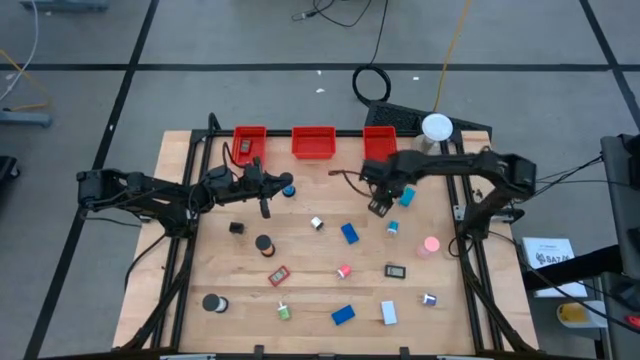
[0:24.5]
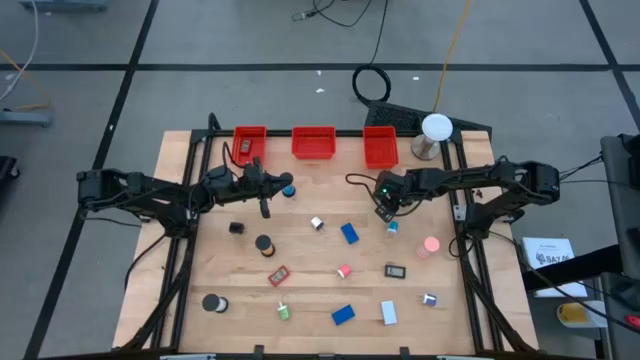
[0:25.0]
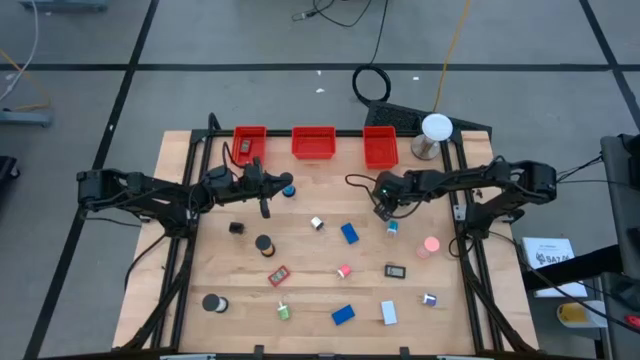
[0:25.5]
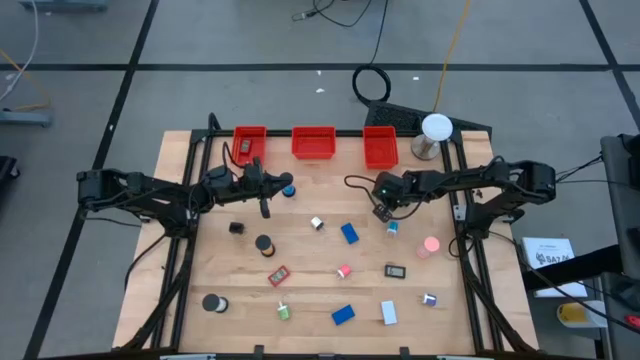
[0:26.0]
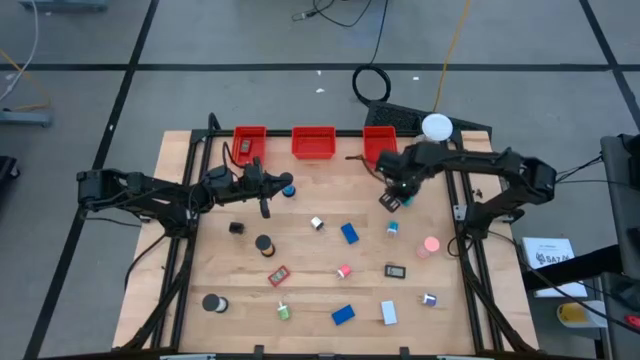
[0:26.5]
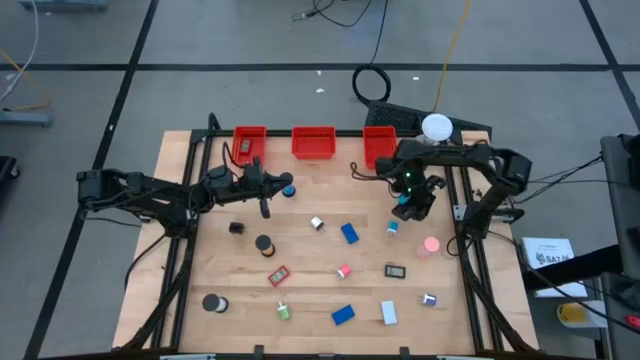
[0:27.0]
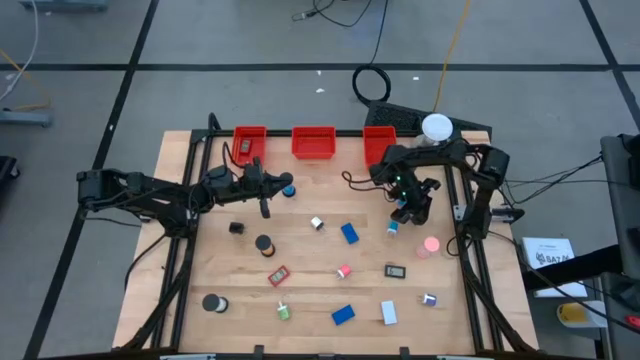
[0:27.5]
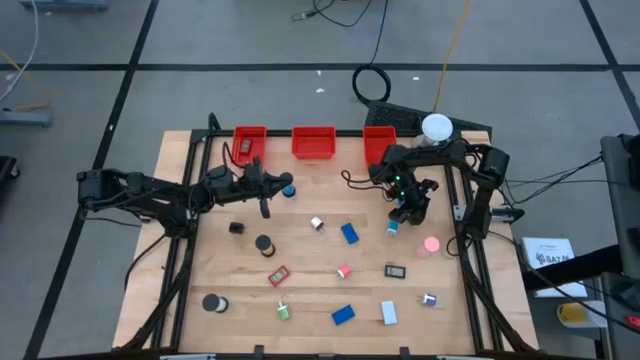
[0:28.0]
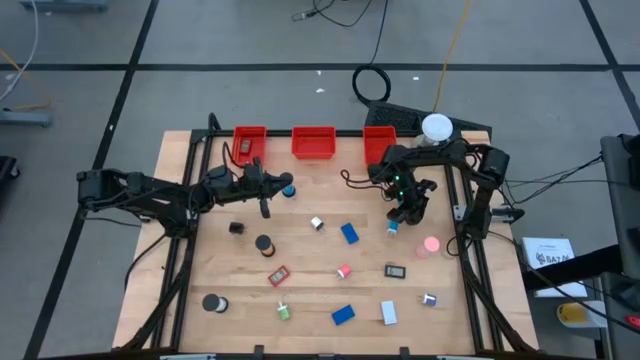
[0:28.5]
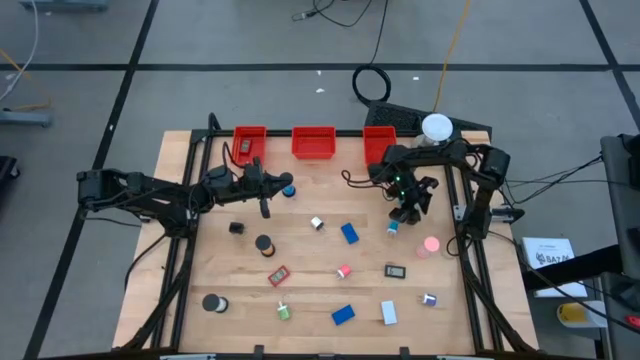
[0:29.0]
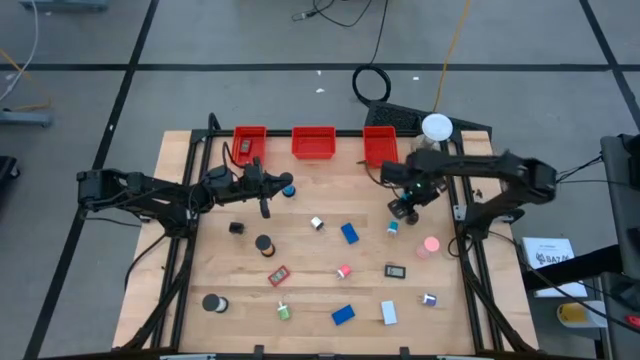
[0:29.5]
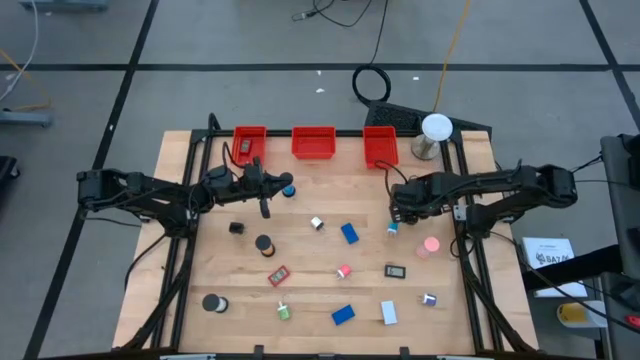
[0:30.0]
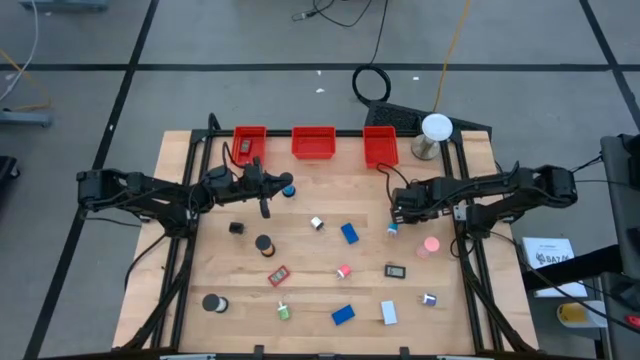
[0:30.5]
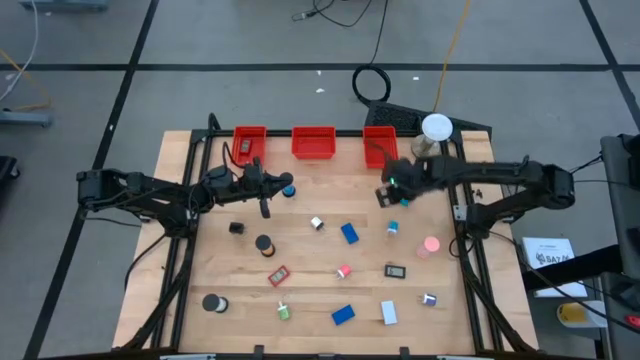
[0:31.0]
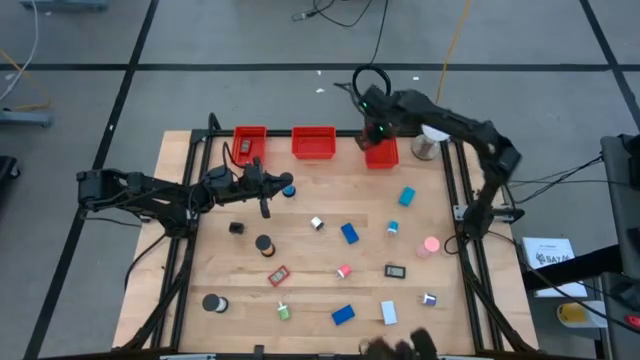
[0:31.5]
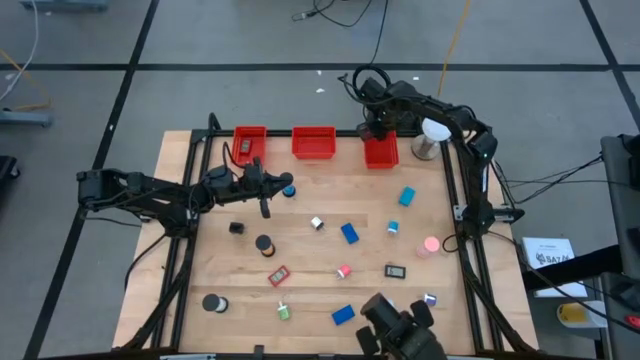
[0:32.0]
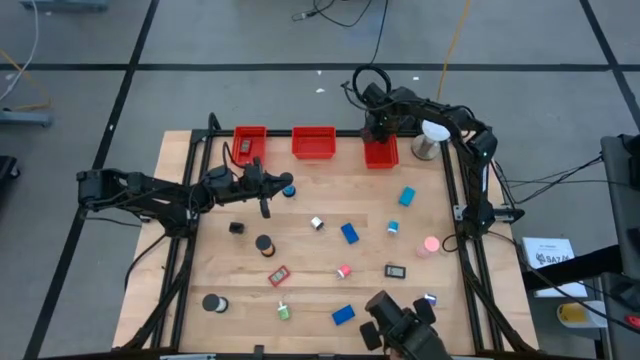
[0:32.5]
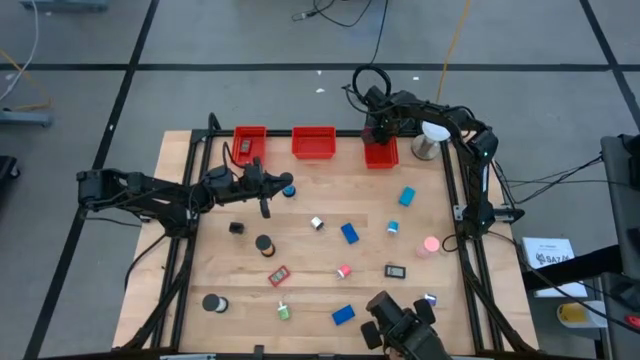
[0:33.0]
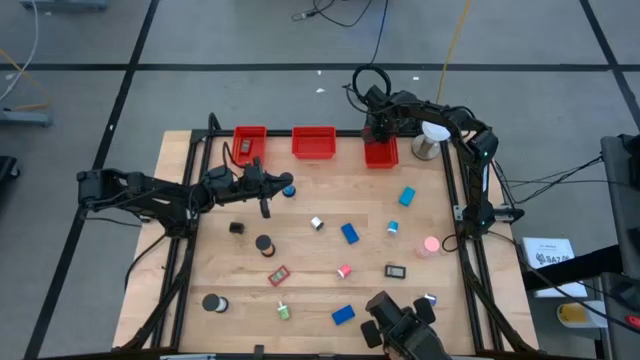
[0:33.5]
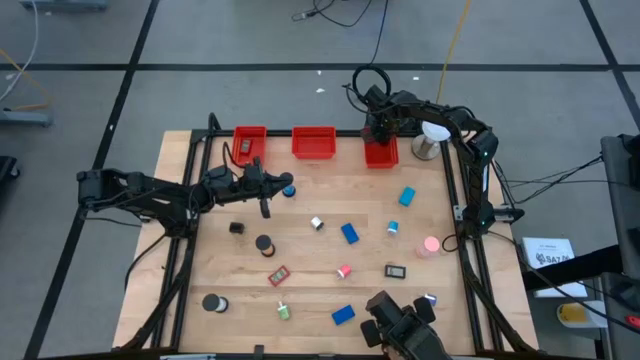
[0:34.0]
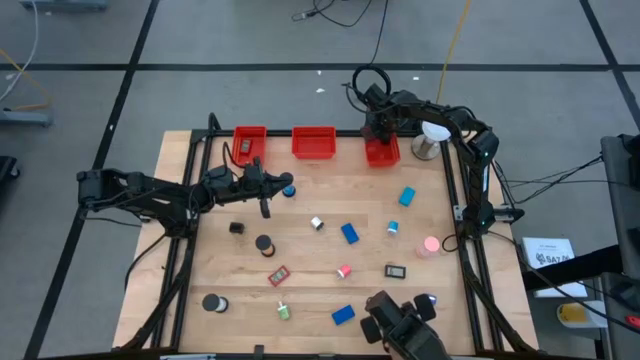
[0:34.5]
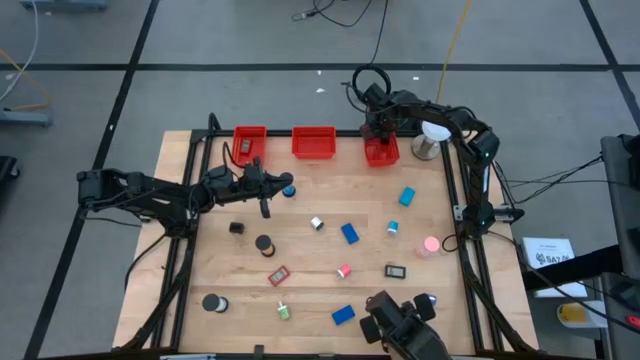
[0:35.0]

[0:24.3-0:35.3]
Task: Pick & Place Office items
Put the right black charger adapter into the right orange basket

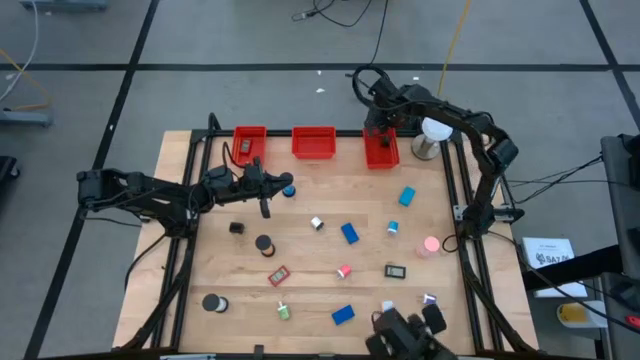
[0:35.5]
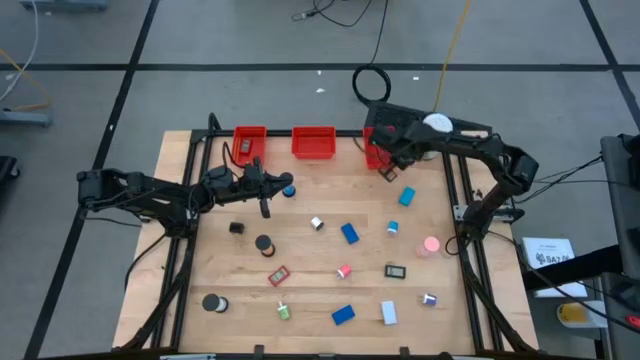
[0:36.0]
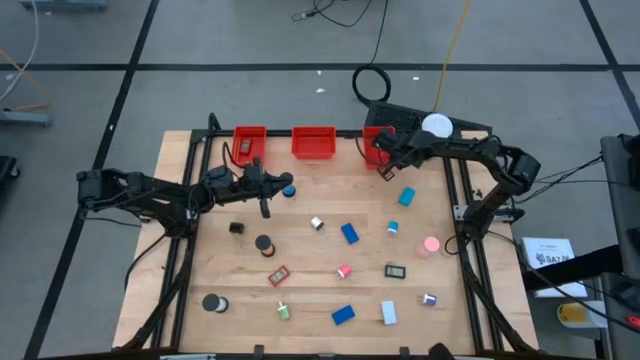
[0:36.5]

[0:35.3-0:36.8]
Adjust the right orange basket

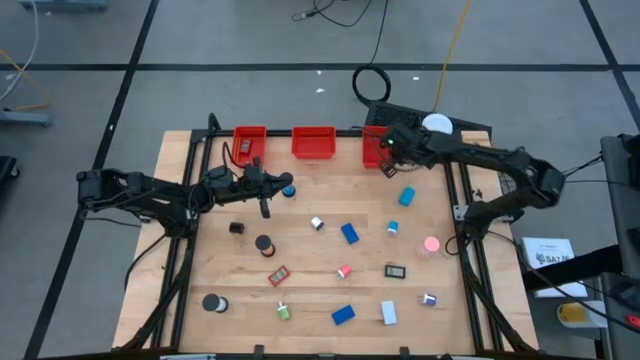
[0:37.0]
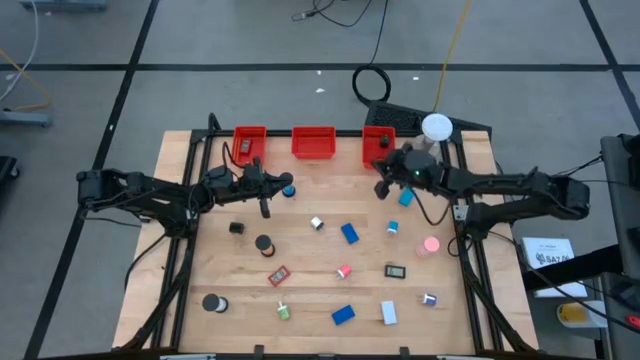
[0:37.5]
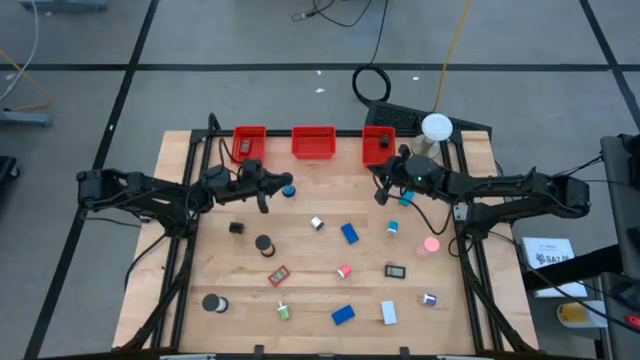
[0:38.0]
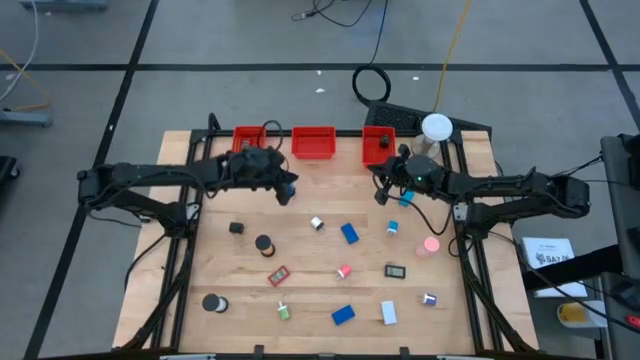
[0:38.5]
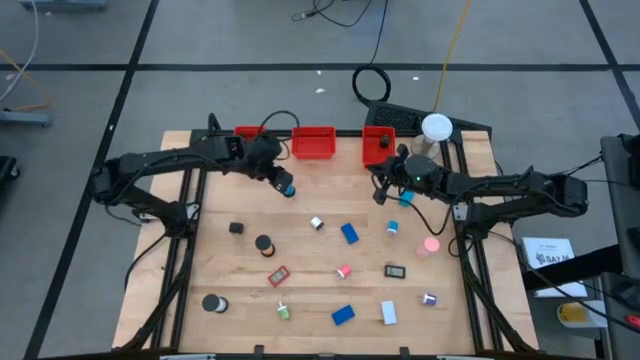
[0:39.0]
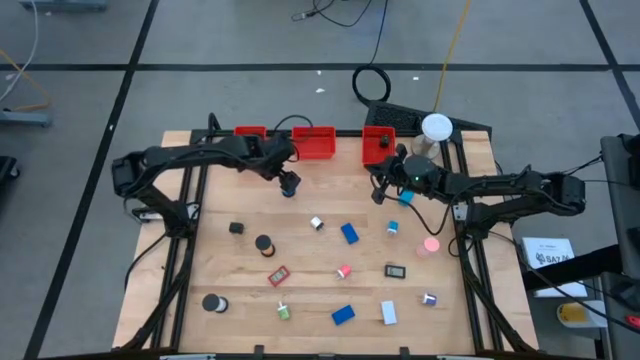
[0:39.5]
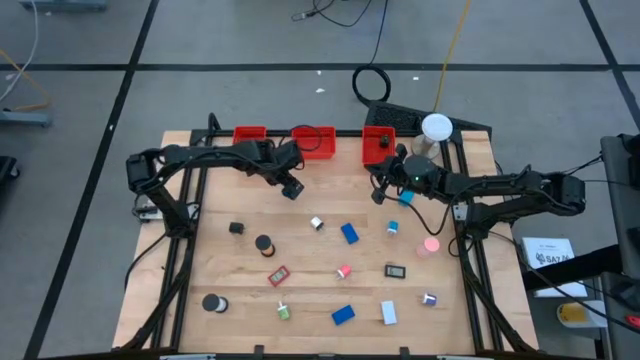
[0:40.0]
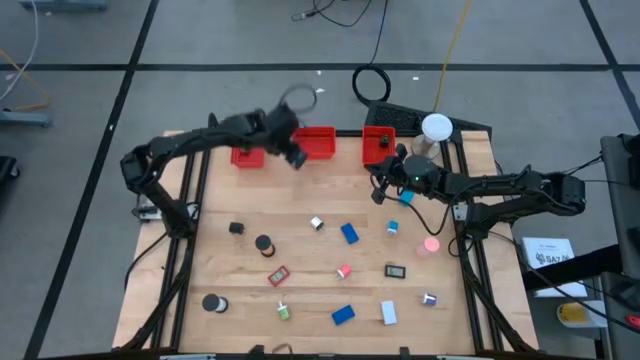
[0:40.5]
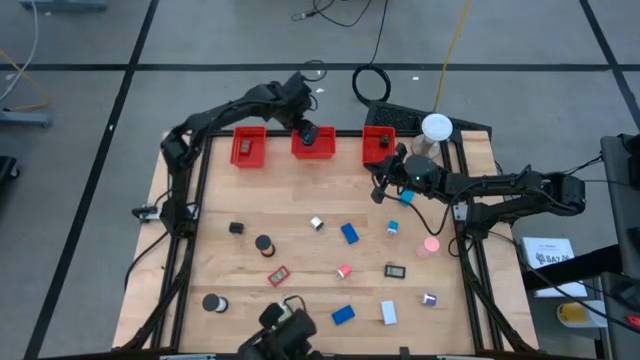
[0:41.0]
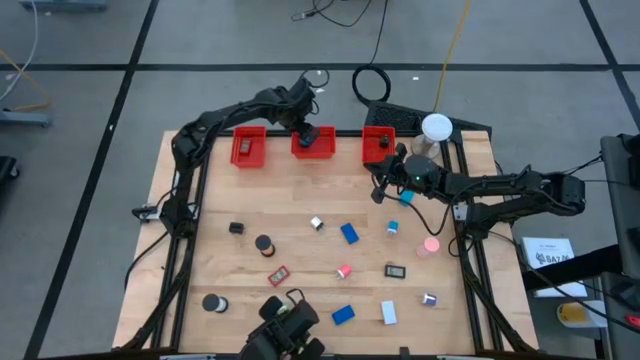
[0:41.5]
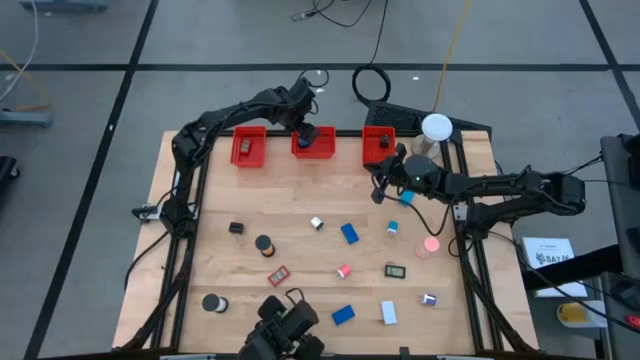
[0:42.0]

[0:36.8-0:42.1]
Put the blue hourglass into the middle orange basket

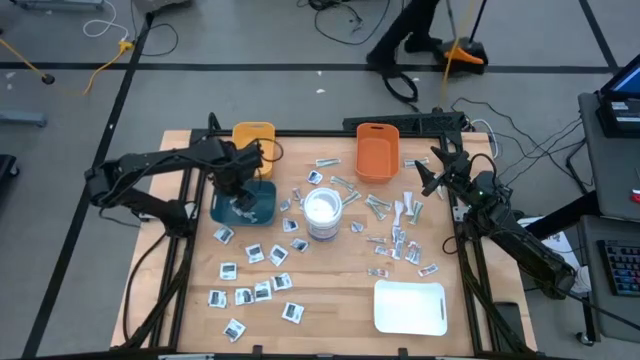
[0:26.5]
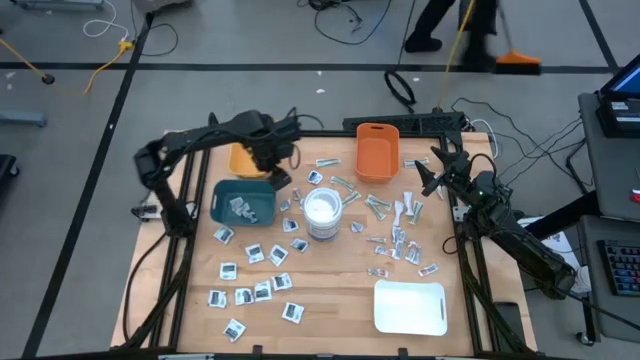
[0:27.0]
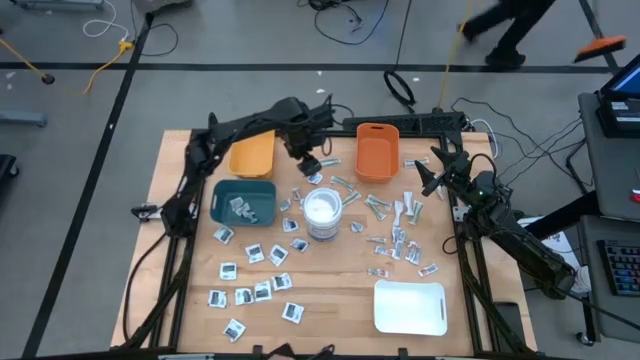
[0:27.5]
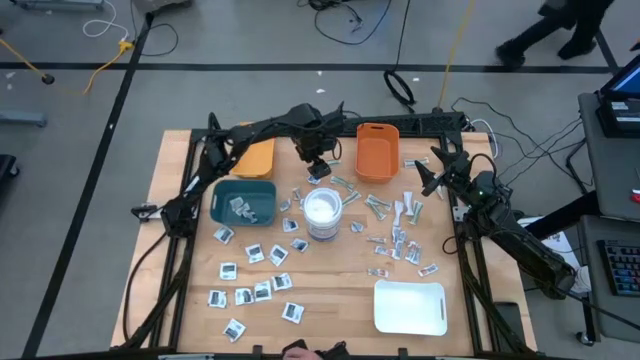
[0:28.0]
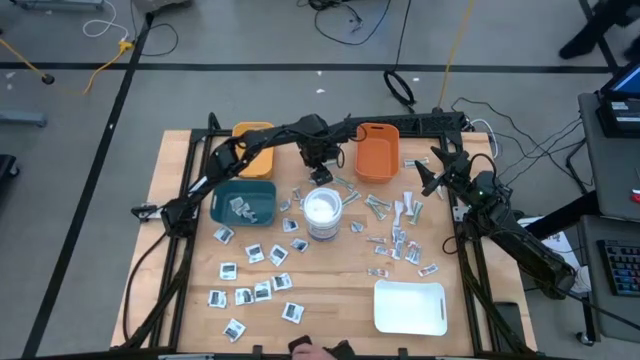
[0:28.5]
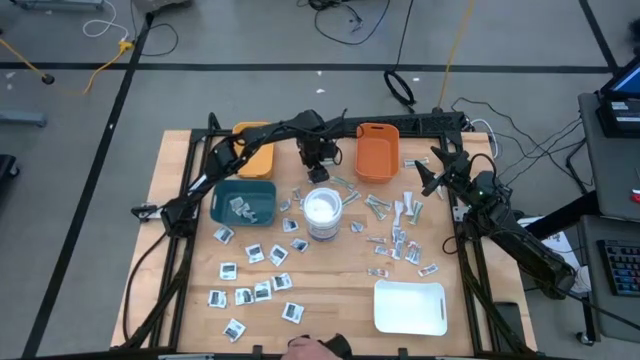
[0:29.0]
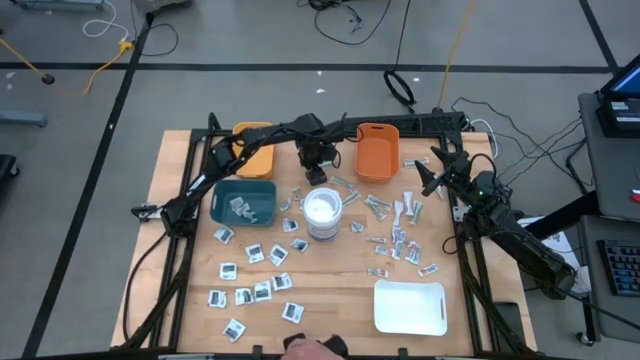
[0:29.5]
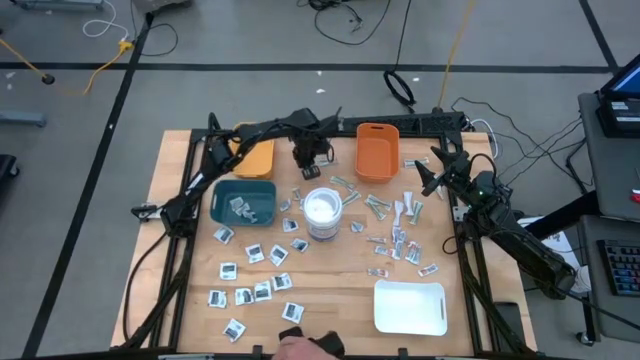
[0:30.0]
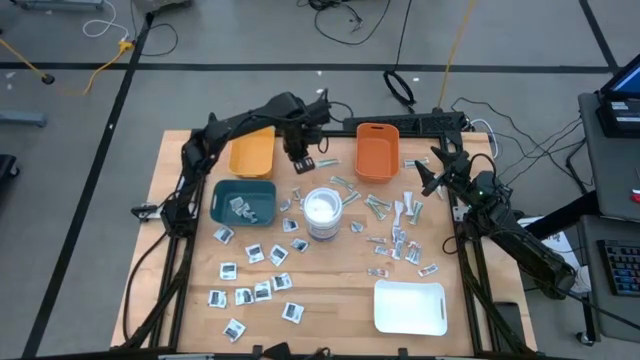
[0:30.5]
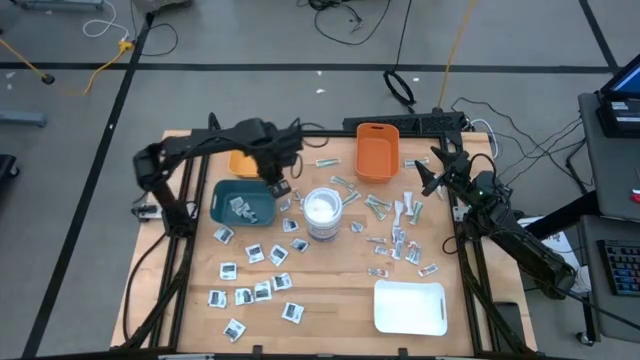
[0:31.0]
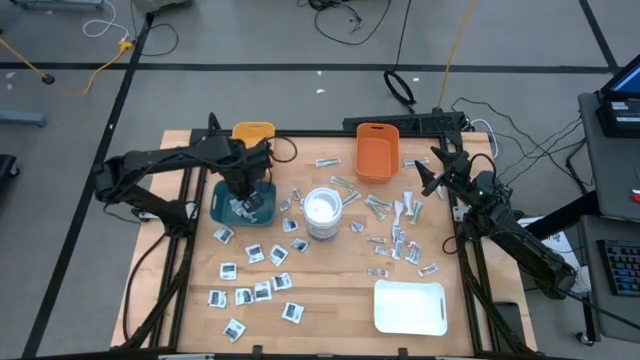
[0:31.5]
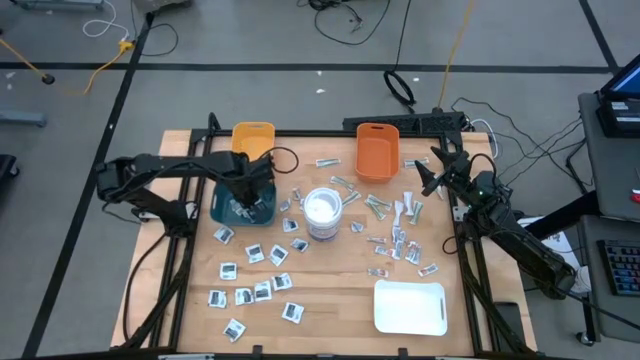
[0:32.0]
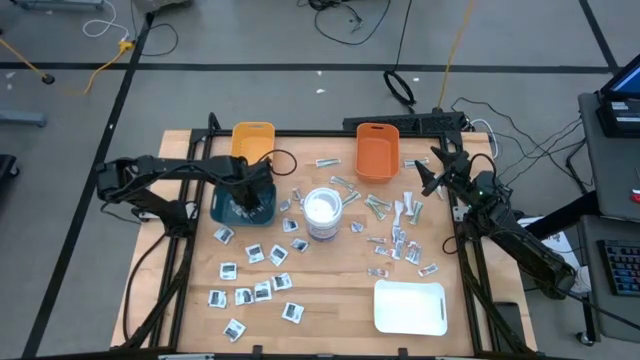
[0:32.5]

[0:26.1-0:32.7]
Task: Pick & Place First Aid Supplies
Put the blue pad into the blue bin
